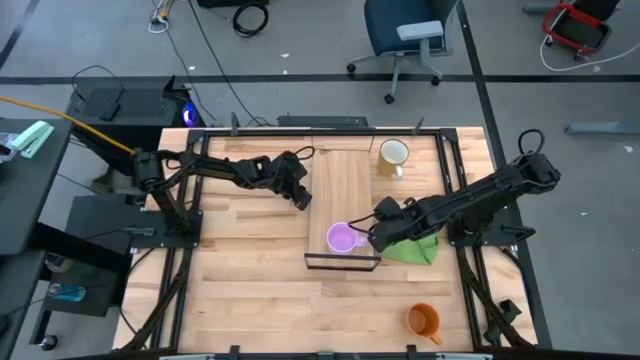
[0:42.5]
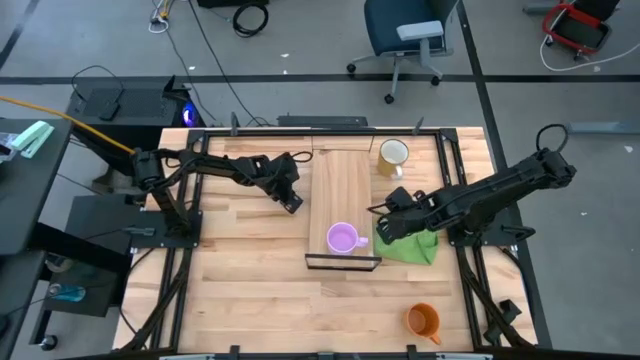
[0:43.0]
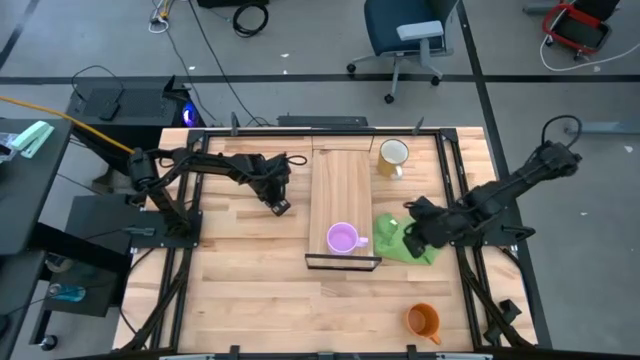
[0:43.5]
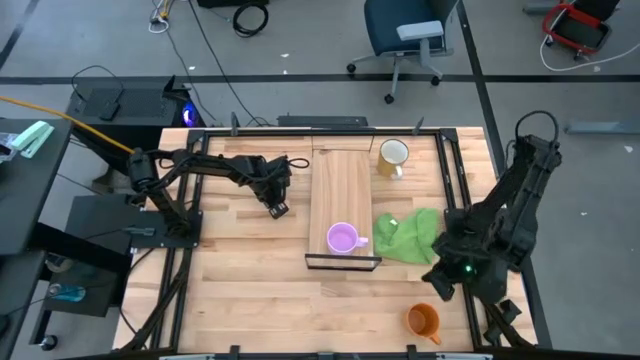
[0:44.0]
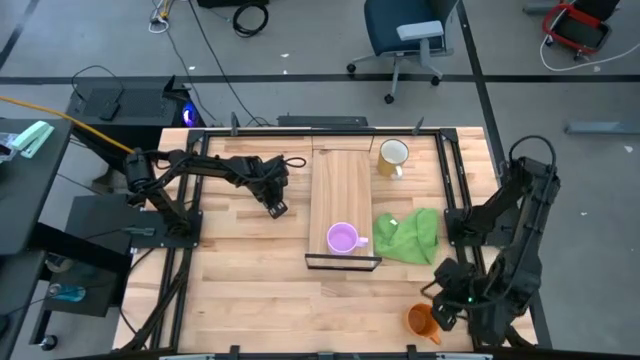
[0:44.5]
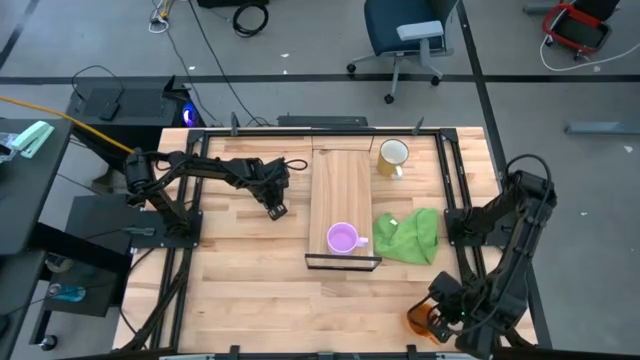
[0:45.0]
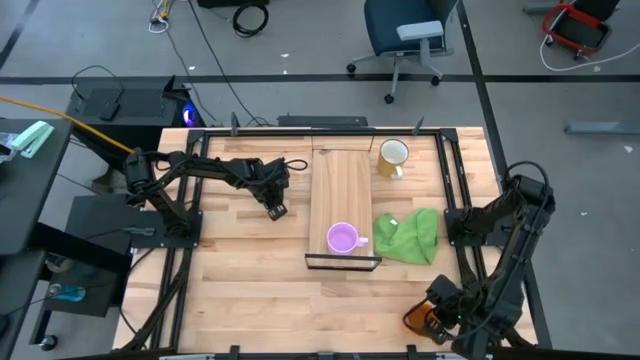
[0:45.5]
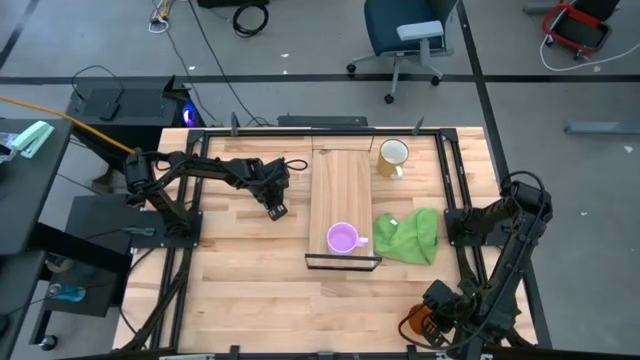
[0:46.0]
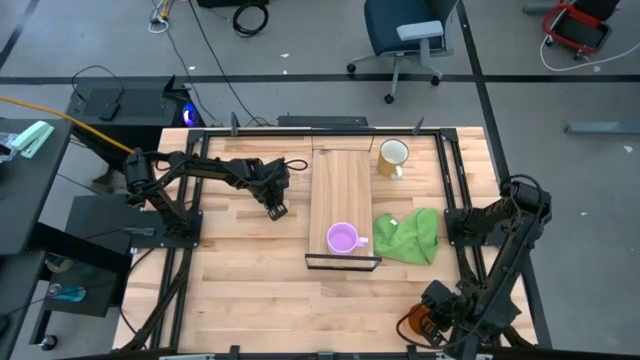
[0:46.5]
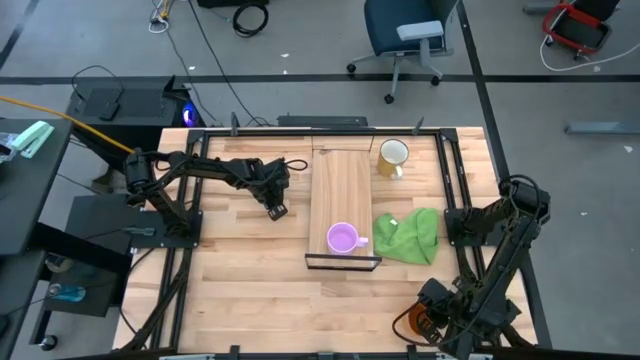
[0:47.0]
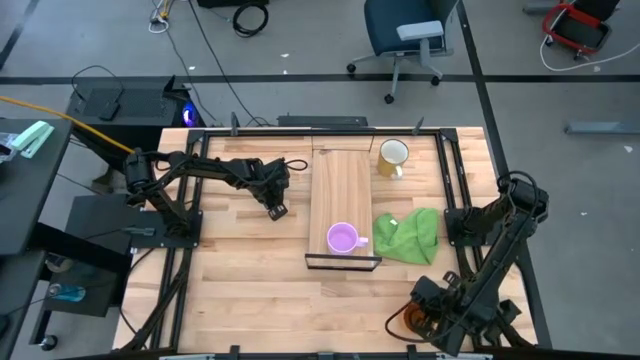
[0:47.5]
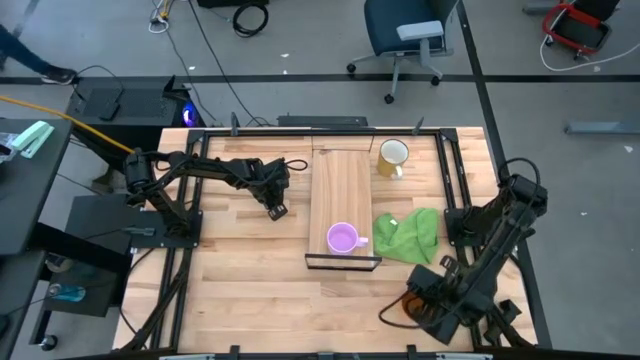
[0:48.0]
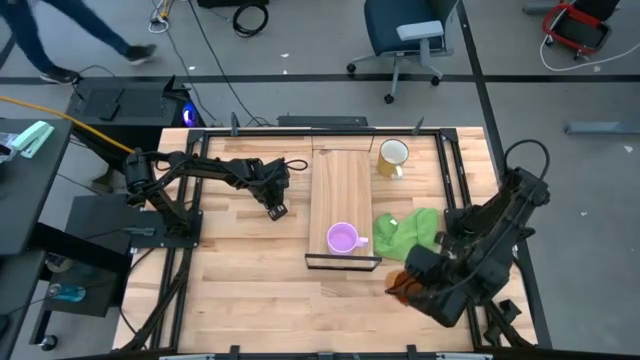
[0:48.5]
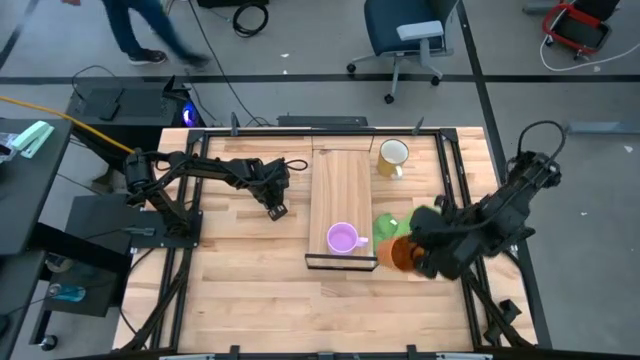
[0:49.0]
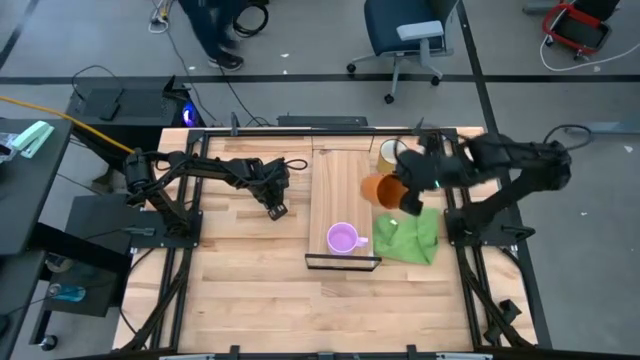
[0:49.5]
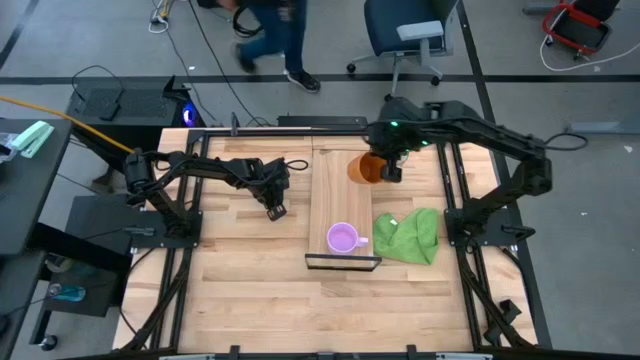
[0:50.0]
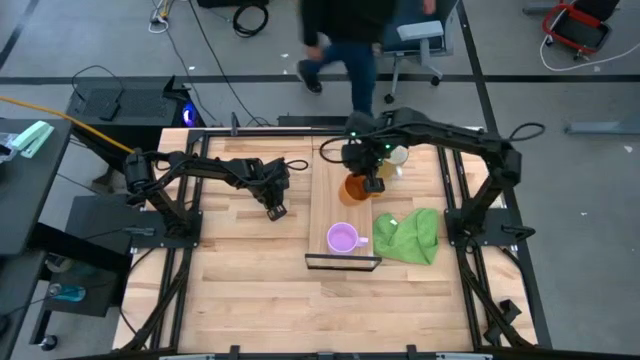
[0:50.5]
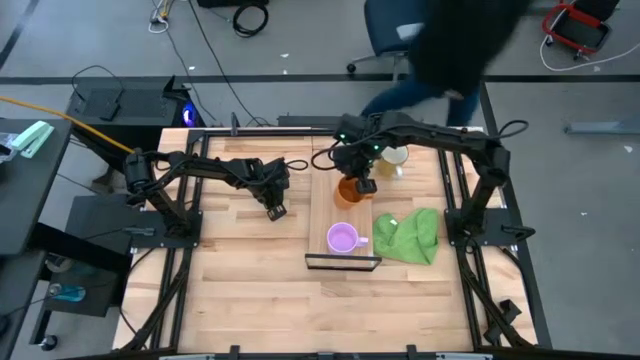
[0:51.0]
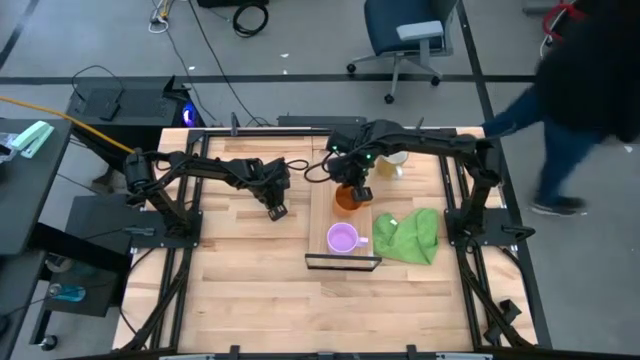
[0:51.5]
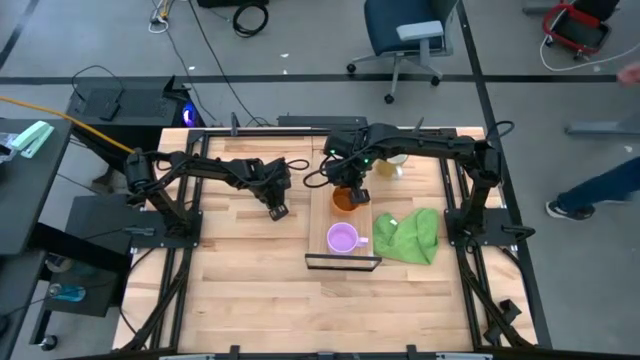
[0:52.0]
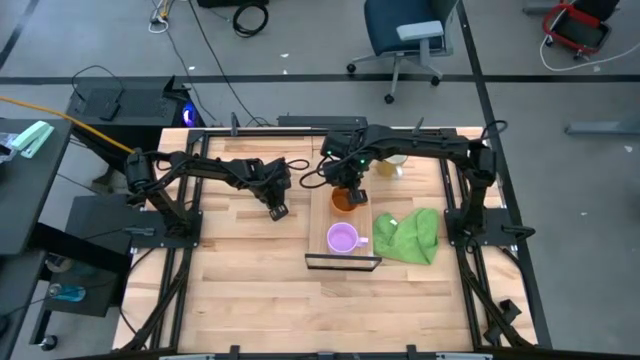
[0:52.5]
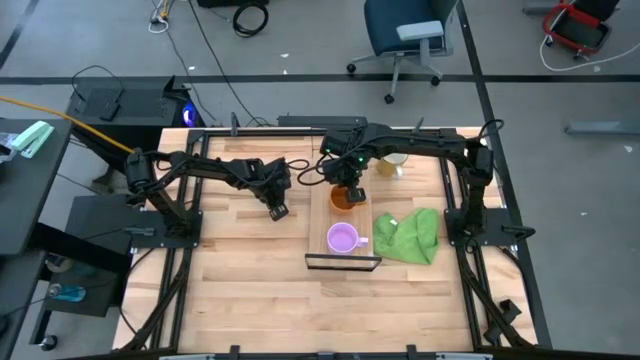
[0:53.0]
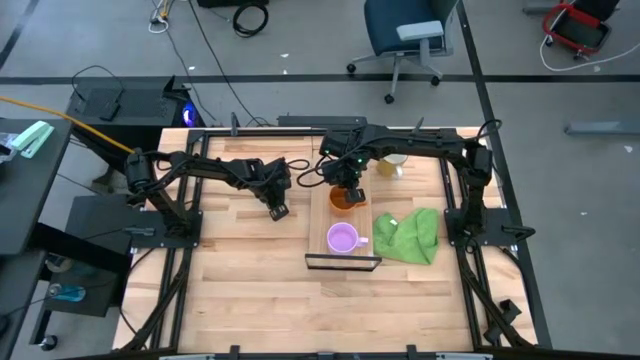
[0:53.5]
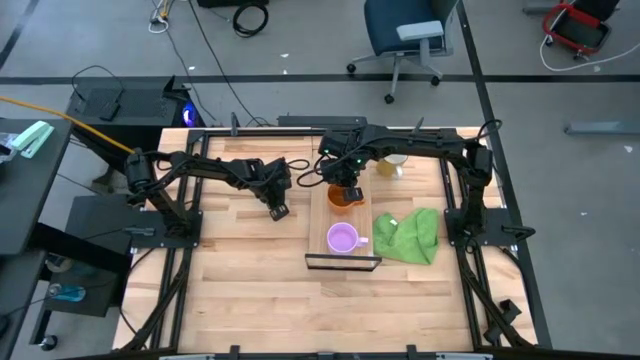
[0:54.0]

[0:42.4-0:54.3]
Task: Stack small to large cups/mugs on shelf
Put the orange mug on the shelf

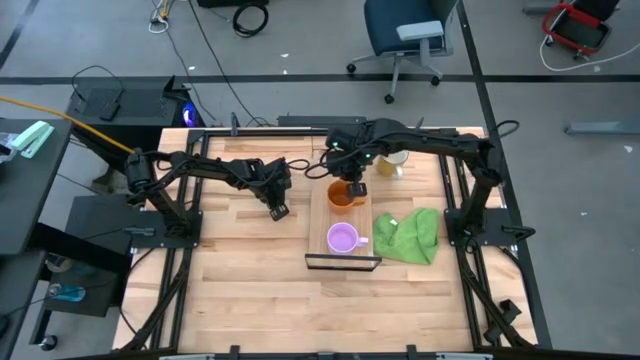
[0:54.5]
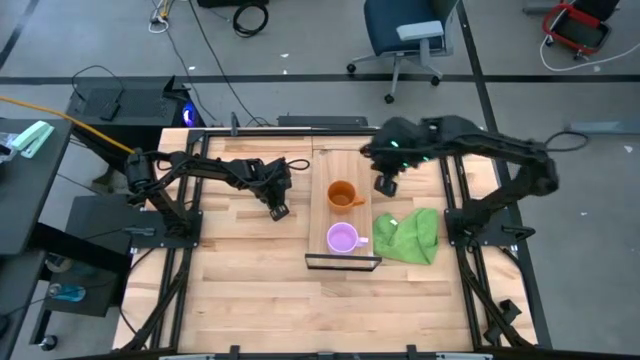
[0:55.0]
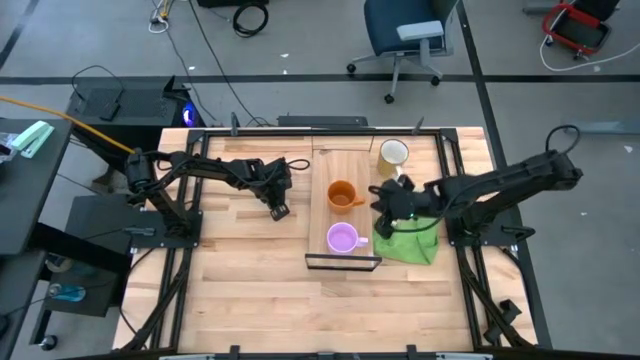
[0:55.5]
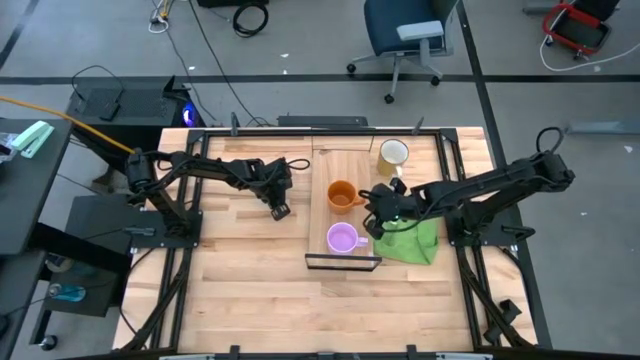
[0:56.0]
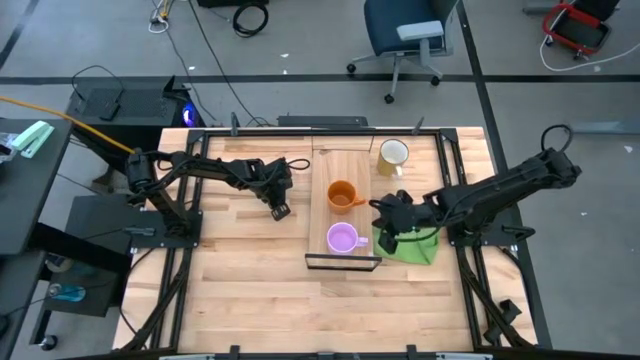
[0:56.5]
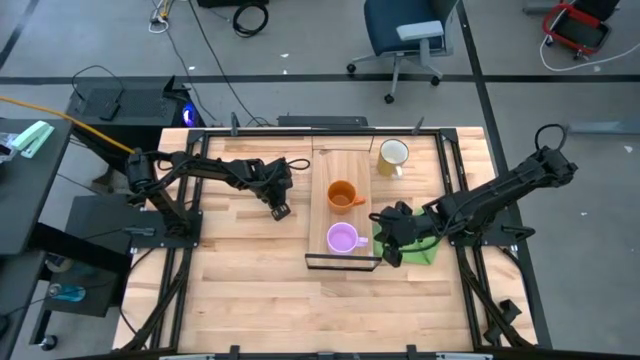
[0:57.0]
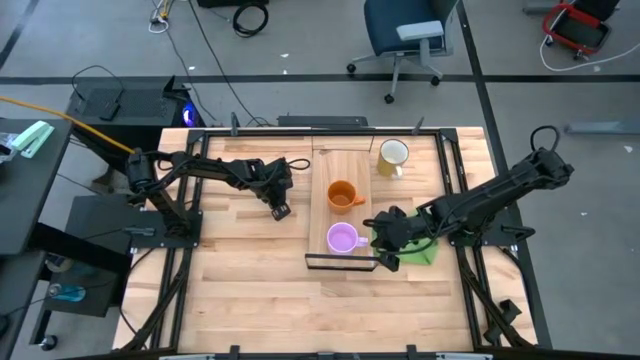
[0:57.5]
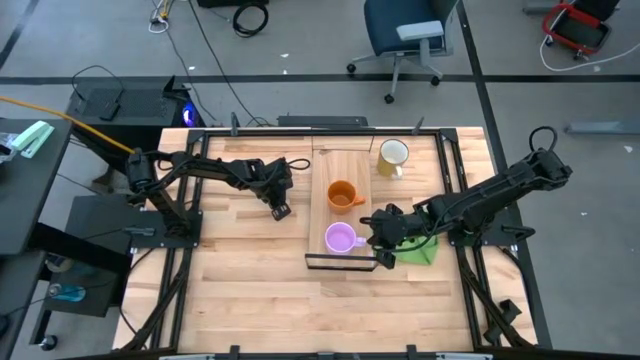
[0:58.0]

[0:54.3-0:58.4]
Adjust the pink mug on the shelf

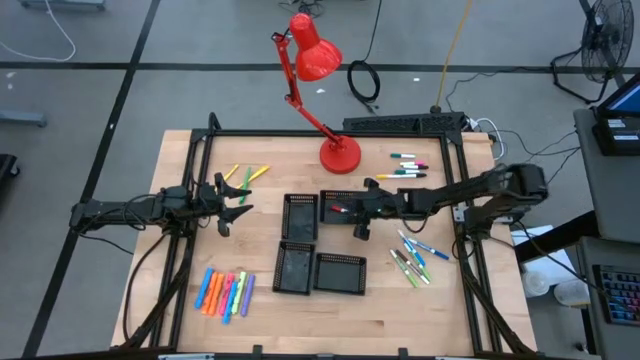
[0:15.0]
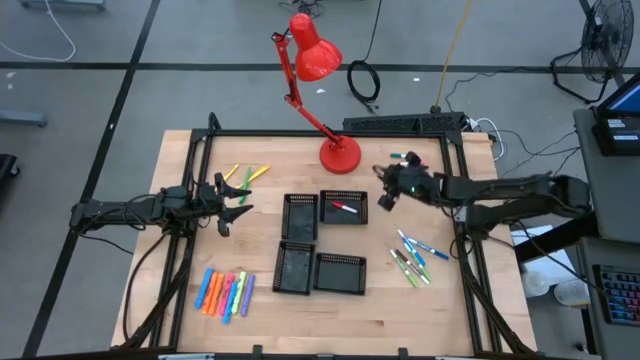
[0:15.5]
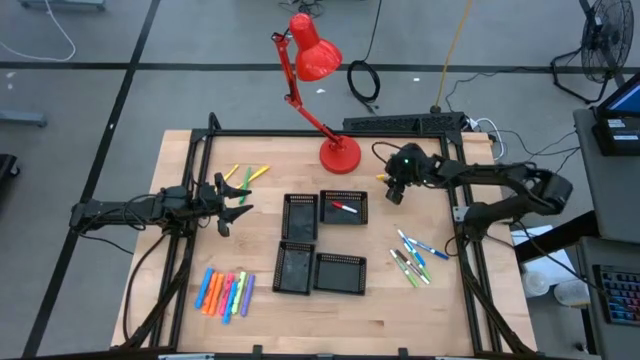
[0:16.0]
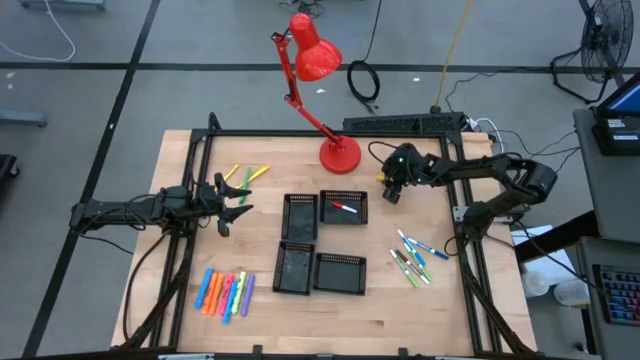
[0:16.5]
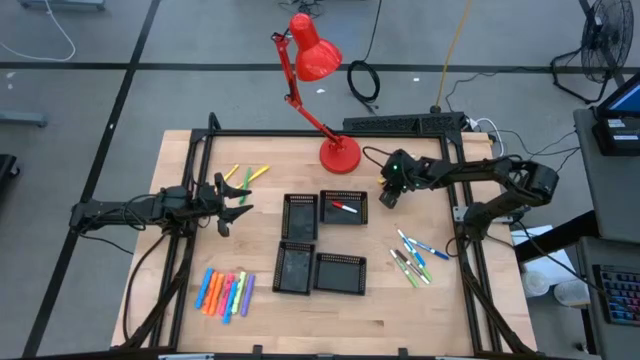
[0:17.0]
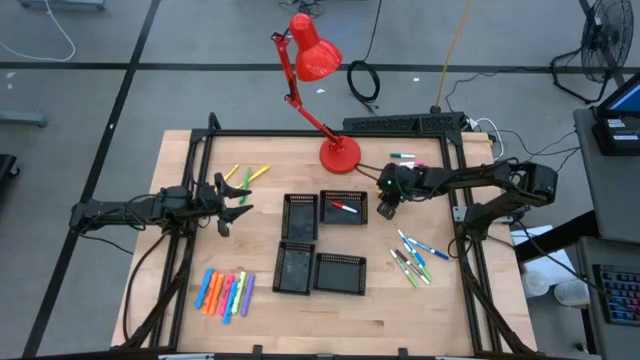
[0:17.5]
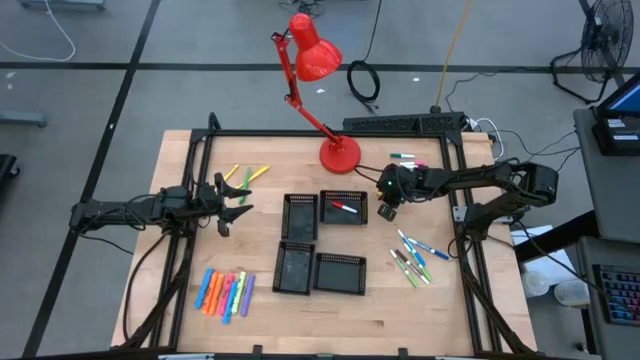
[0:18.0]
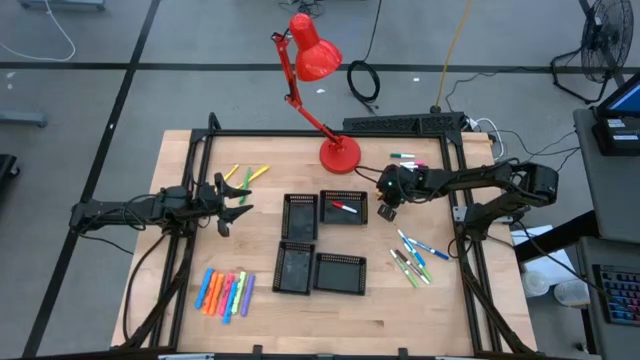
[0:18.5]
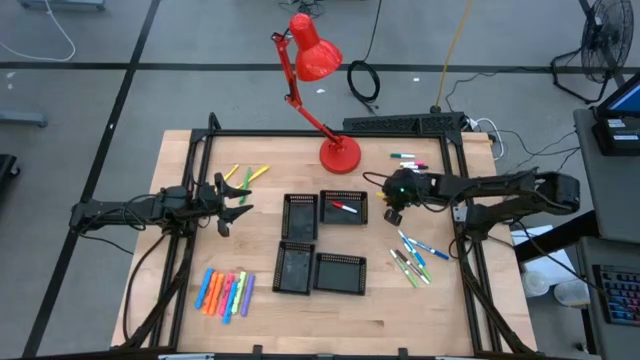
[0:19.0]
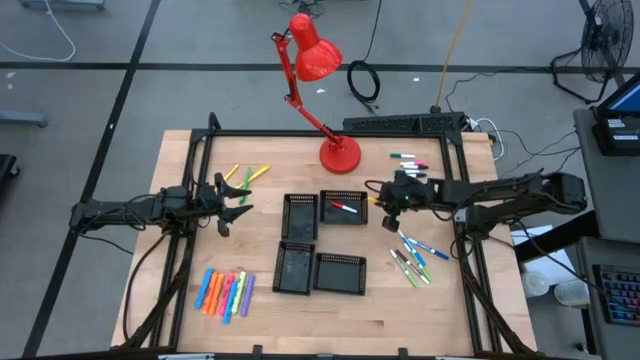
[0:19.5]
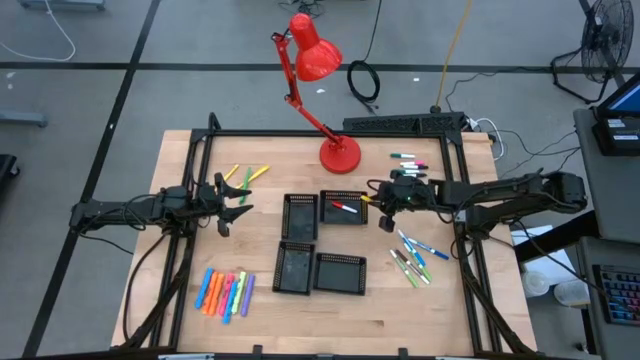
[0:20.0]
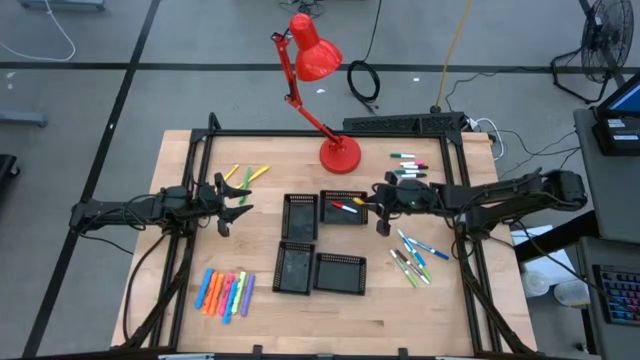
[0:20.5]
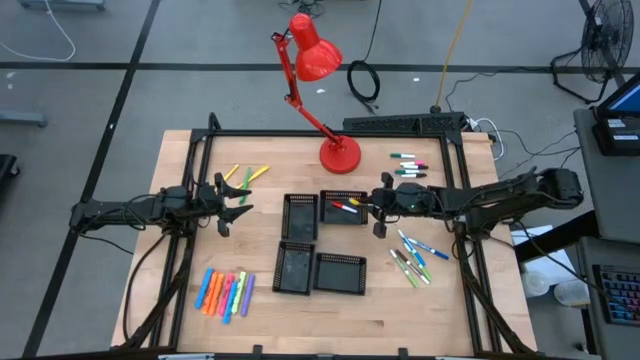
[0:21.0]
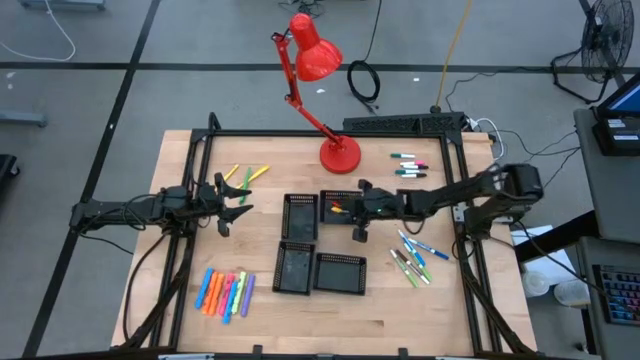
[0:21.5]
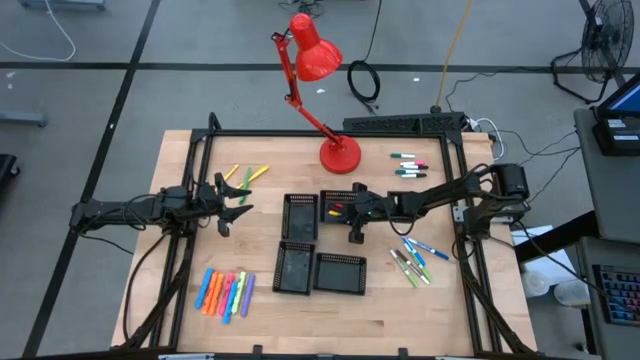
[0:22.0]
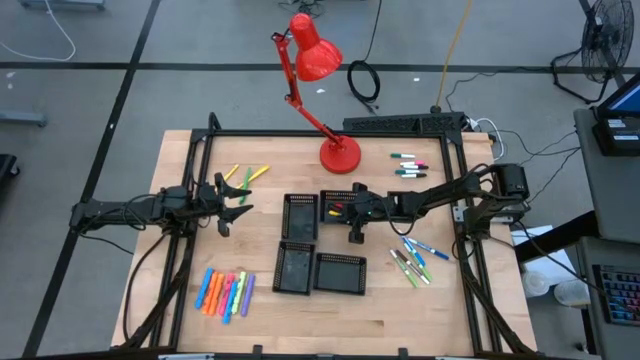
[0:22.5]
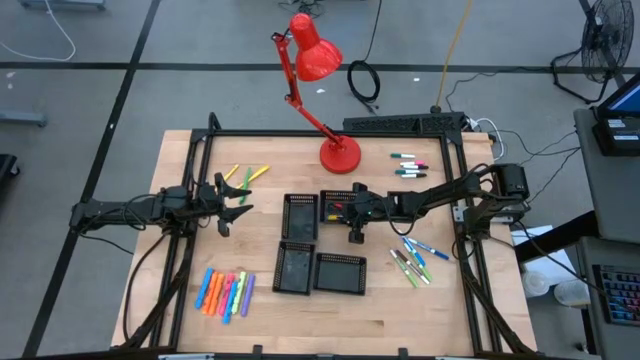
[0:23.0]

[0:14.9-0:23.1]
Task: Pick & Place Markers
Put the yellow highlighter pen into the top right black bin
